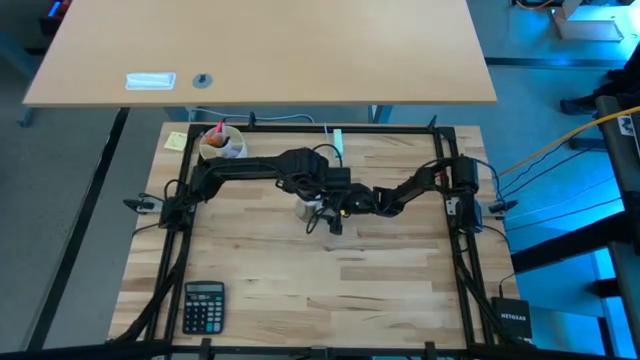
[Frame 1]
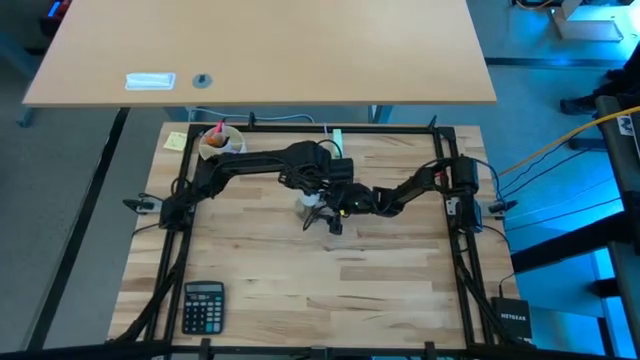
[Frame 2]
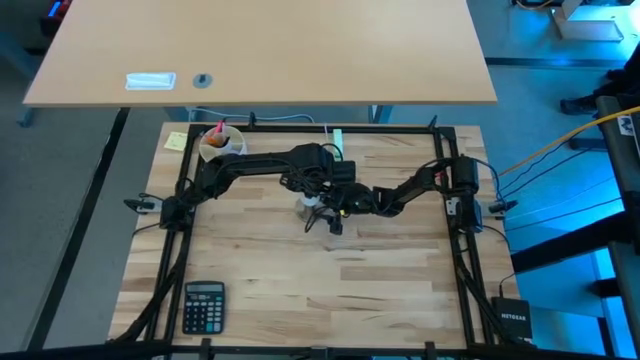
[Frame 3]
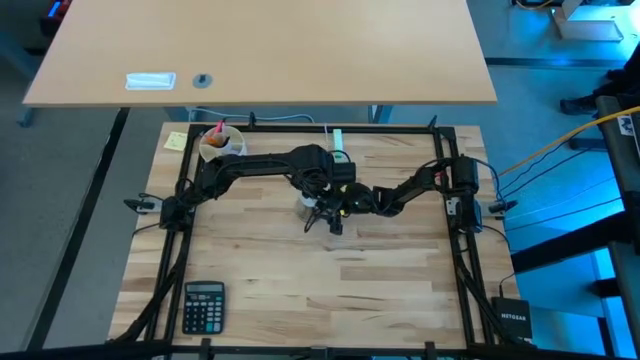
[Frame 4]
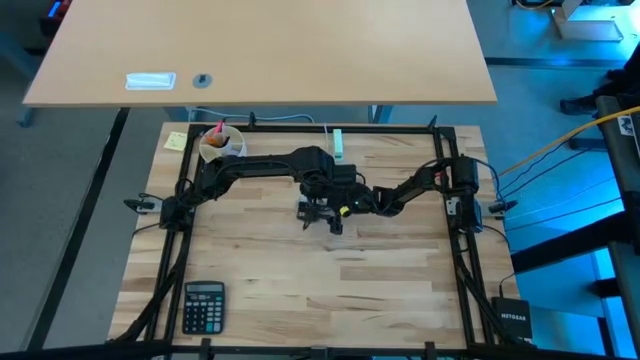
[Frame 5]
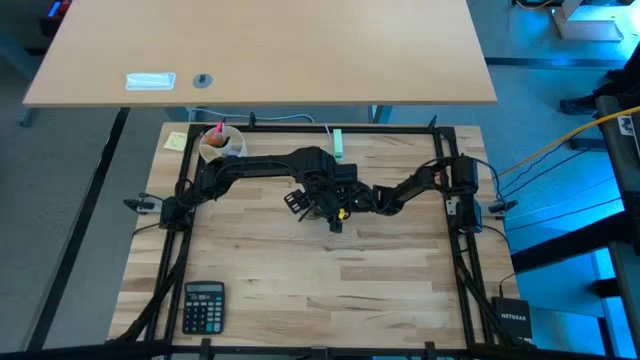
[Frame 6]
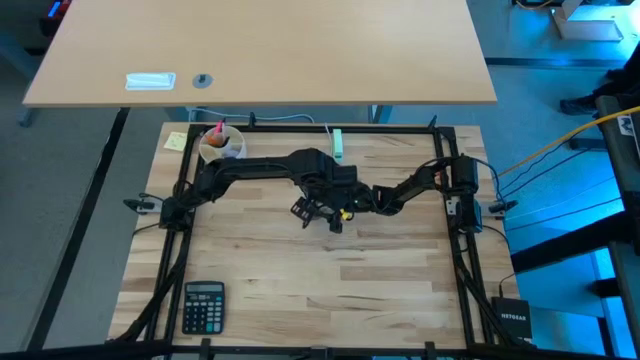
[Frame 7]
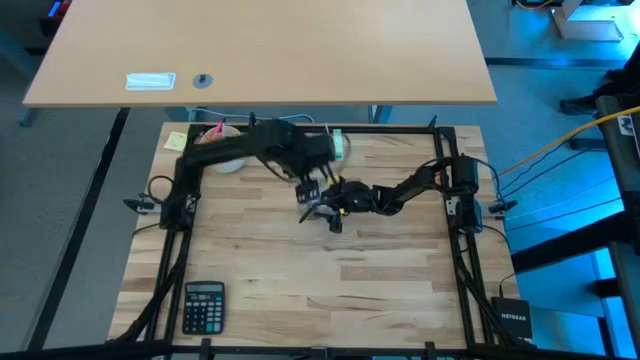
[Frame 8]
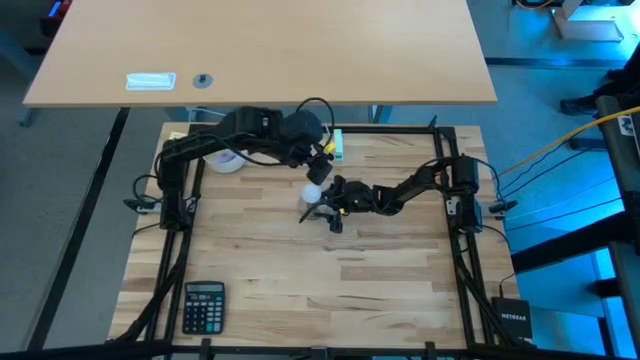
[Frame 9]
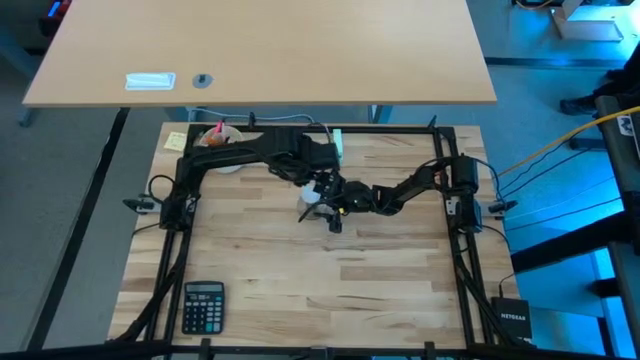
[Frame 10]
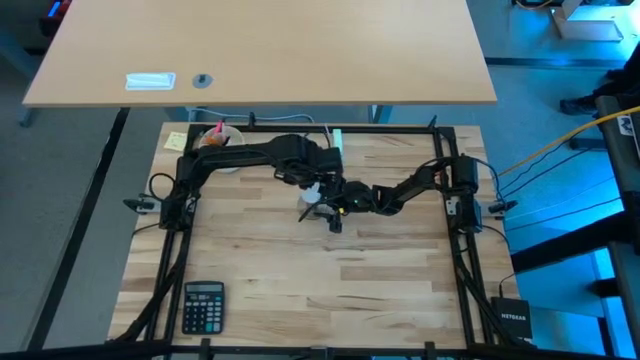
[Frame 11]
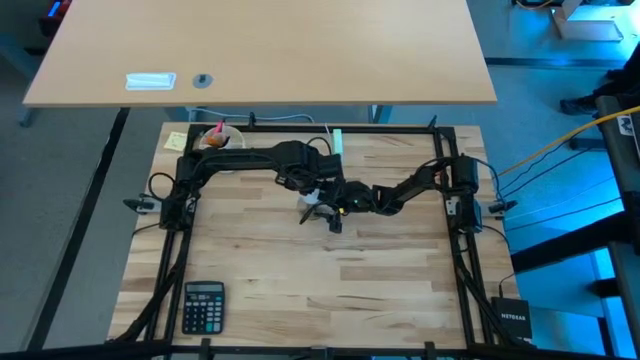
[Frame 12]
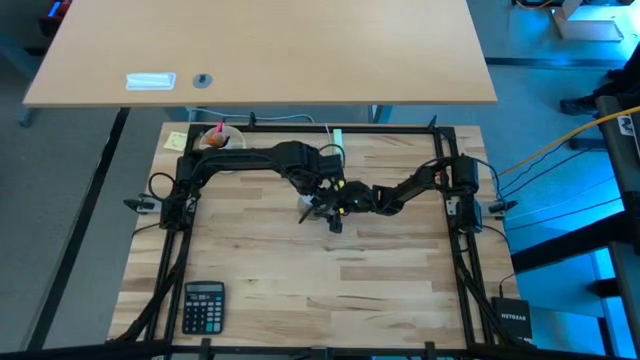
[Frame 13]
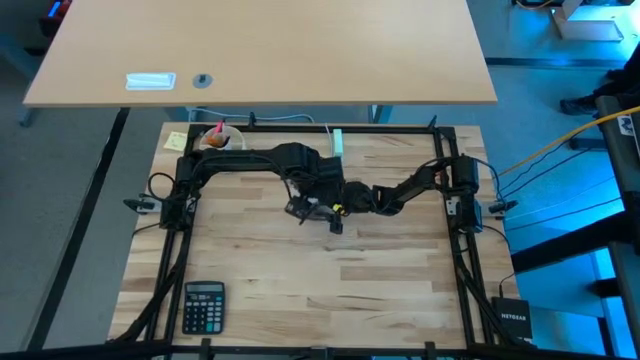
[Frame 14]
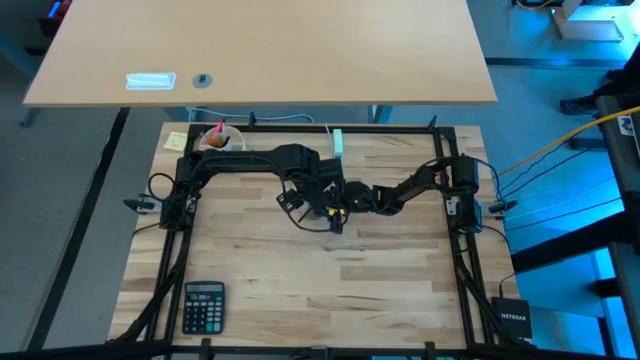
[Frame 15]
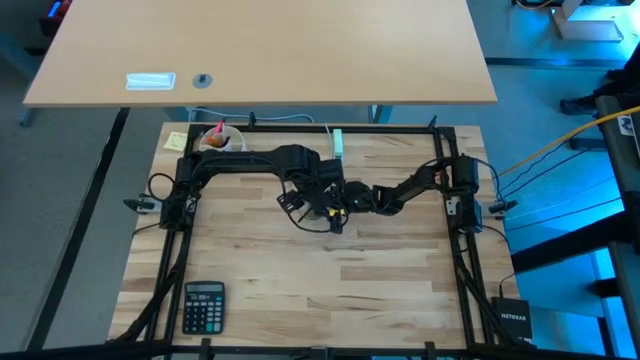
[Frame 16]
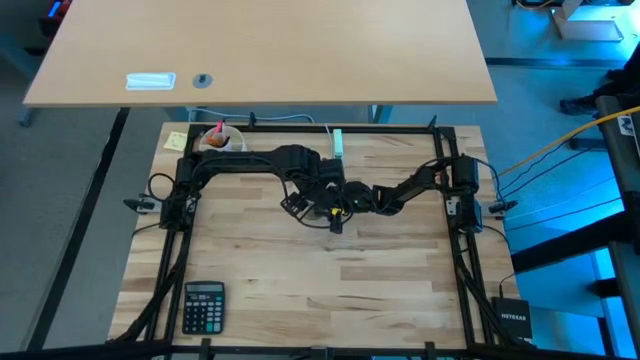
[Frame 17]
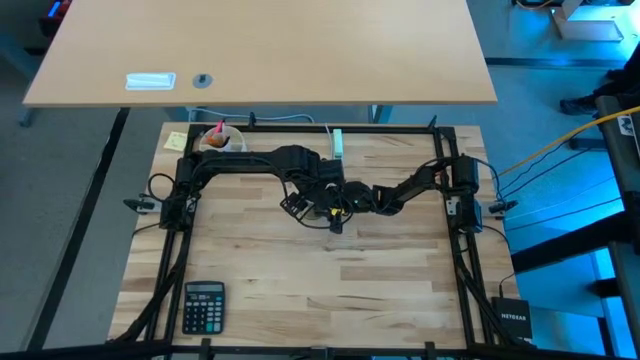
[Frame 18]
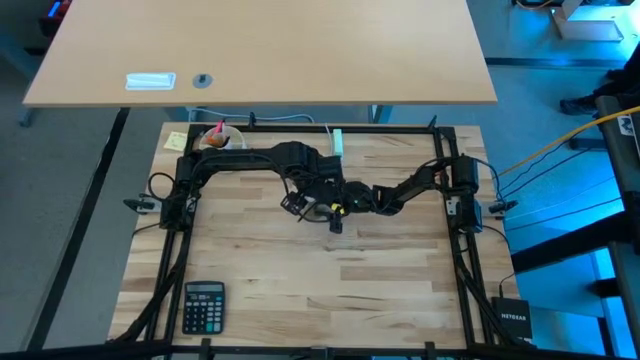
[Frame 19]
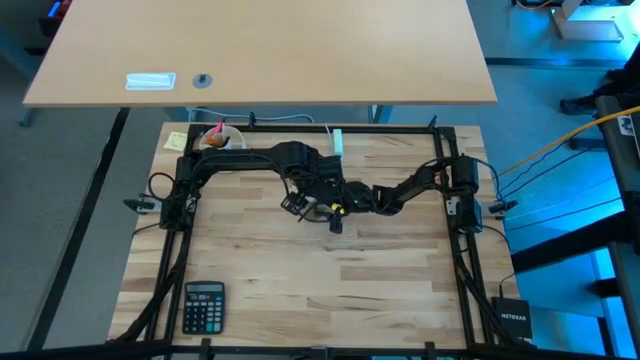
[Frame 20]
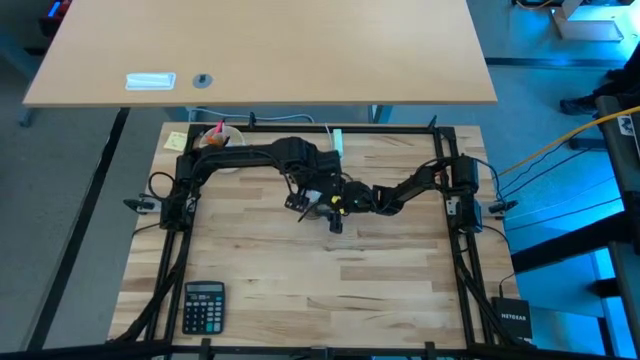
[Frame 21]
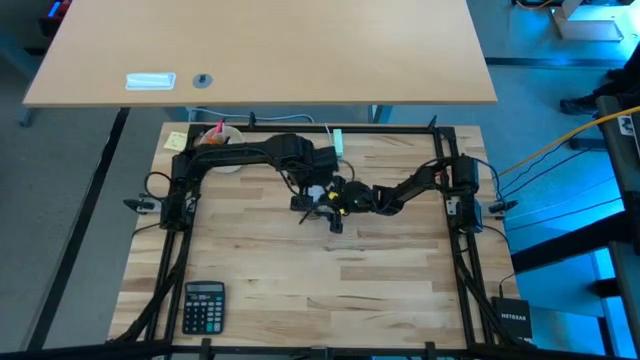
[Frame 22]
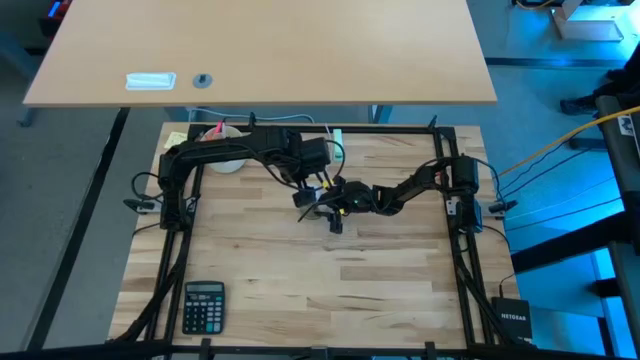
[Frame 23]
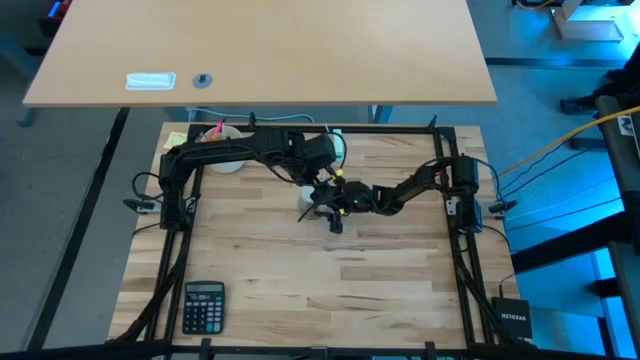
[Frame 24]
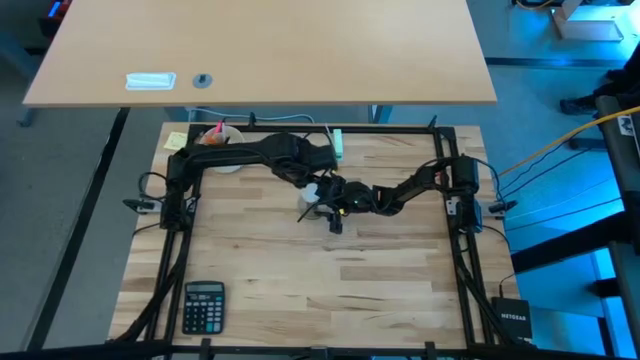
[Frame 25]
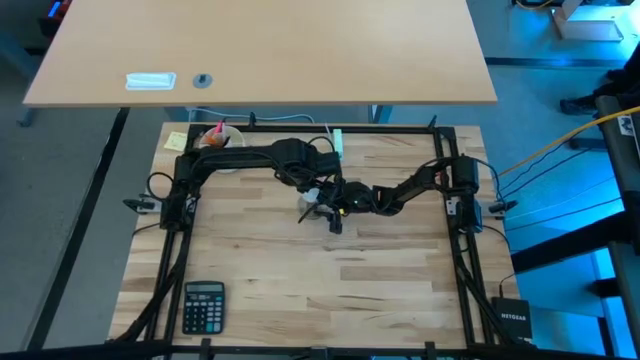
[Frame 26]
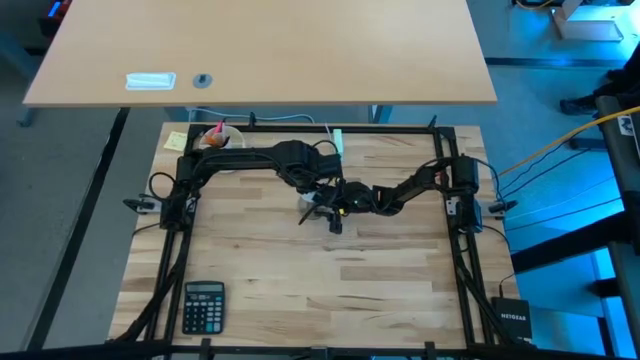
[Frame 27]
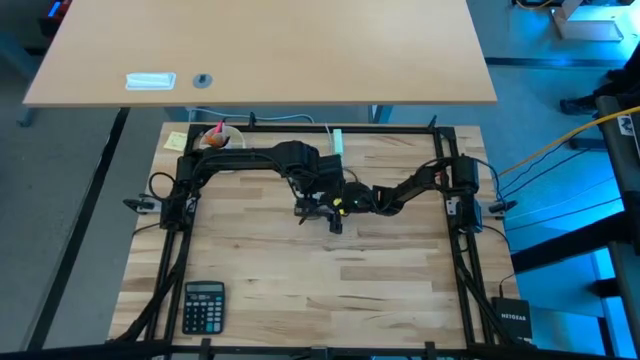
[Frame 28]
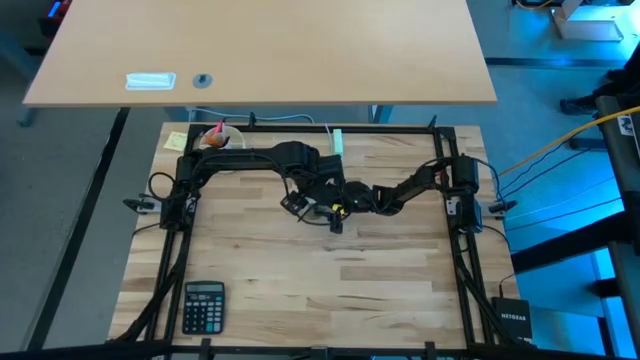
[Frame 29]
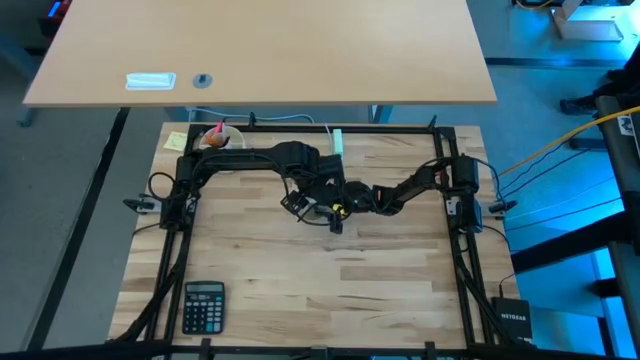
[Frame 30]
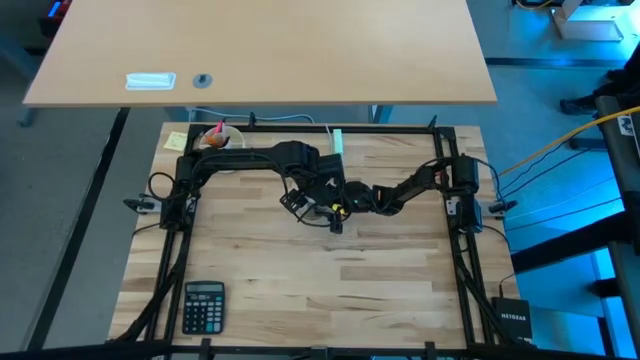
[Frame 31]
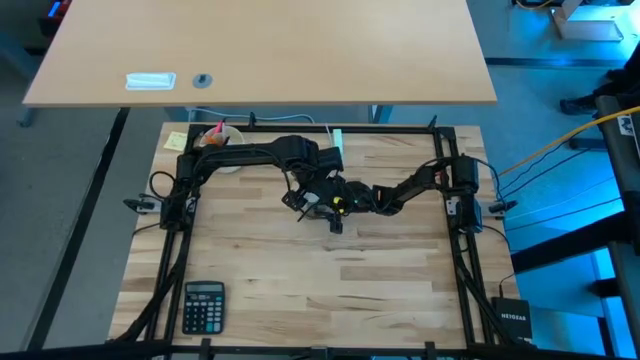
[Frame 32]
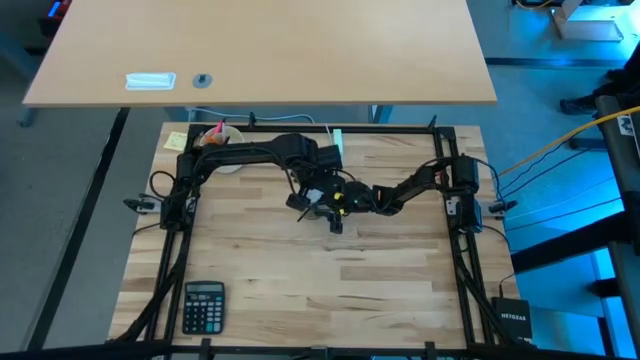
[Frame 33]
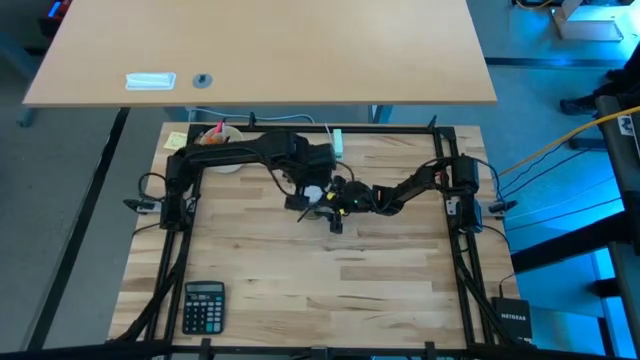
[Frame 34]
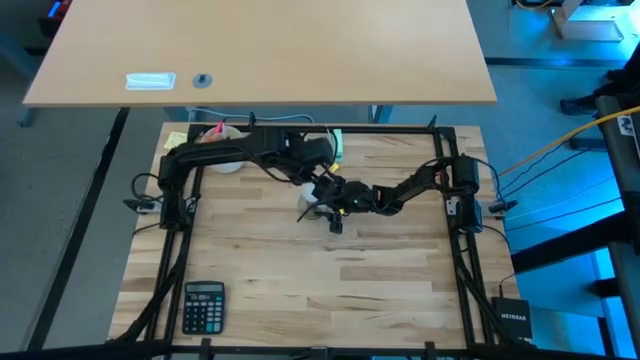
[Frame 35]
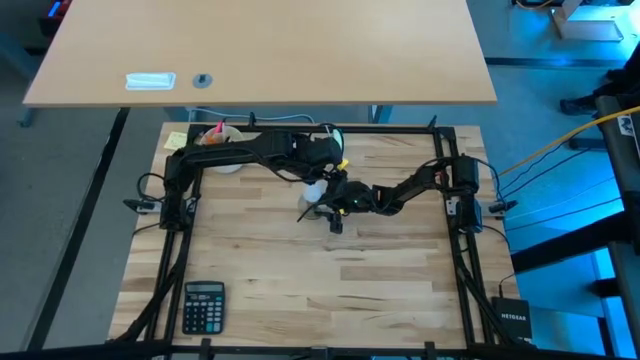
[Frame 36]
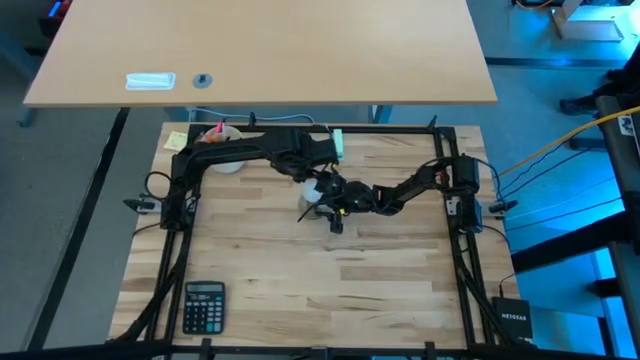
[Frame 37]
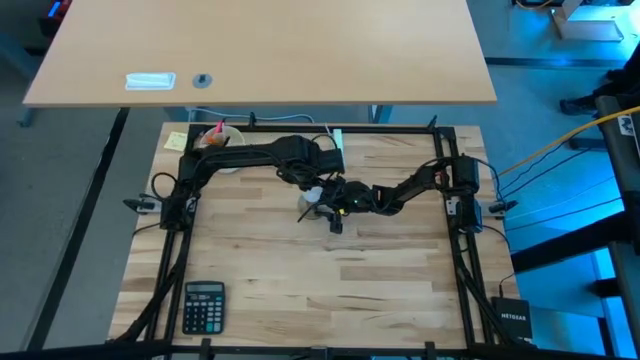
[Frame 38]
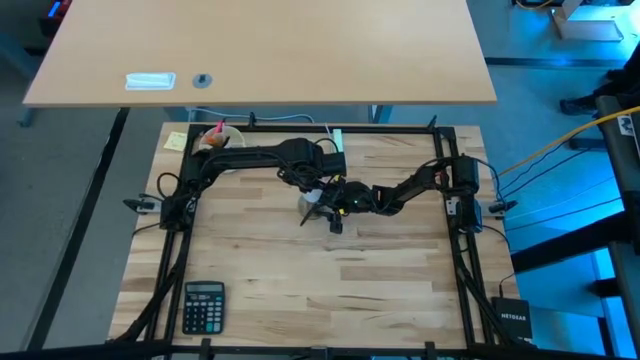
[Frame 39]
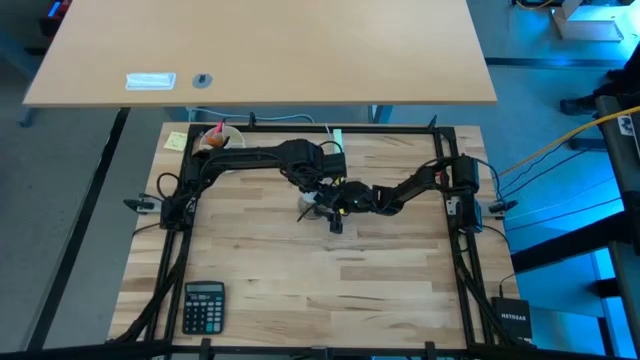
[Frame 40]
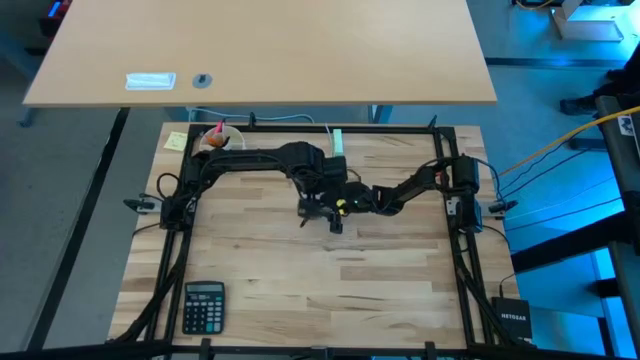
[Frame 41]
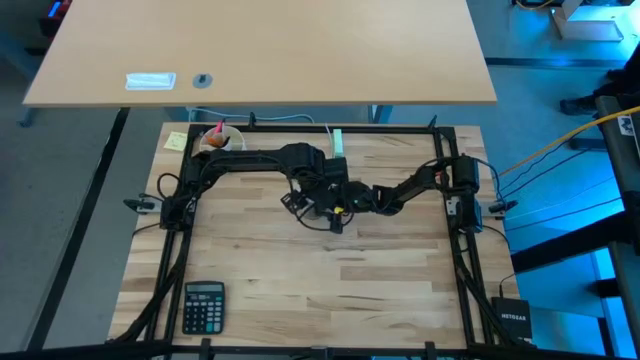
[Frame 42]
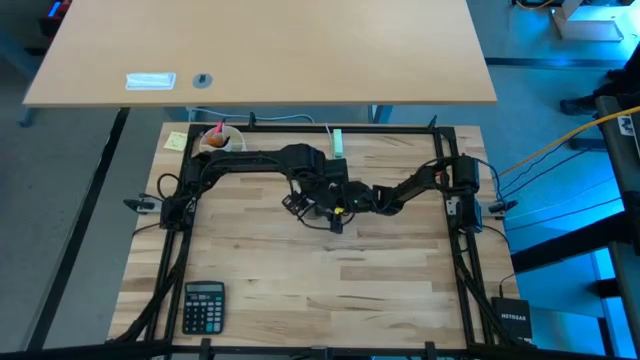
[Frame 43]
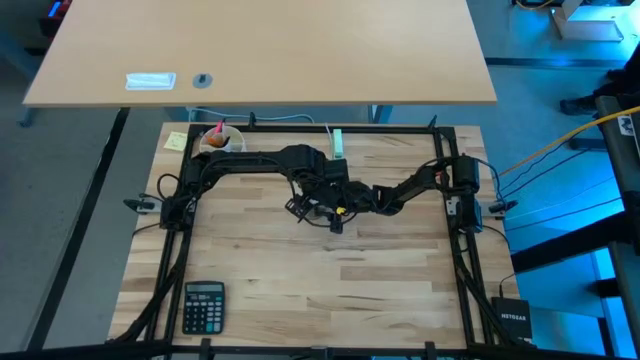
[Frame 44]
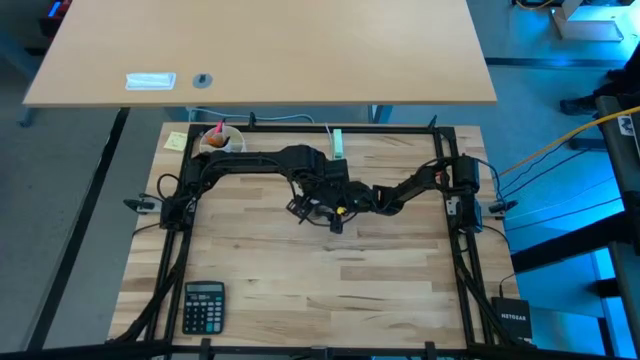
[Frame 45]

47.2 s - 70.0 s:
Task: Screw lightbulb
Insert the lightbulb into the lamp socket
